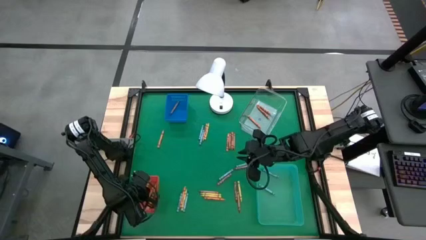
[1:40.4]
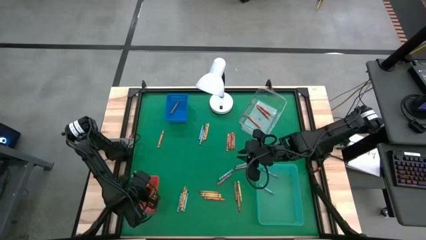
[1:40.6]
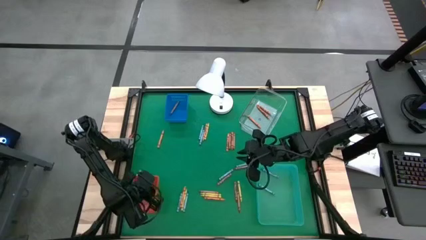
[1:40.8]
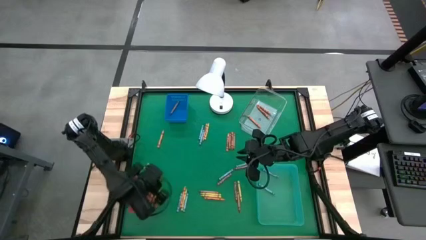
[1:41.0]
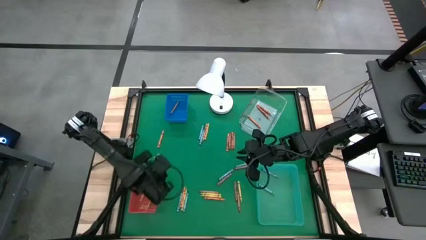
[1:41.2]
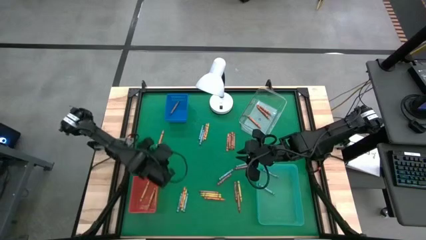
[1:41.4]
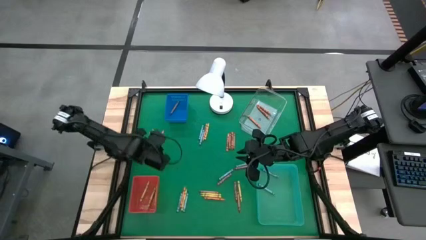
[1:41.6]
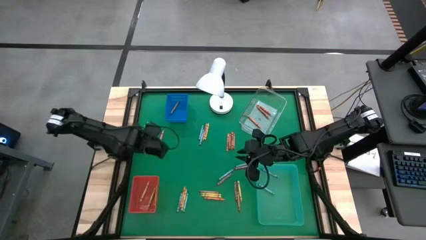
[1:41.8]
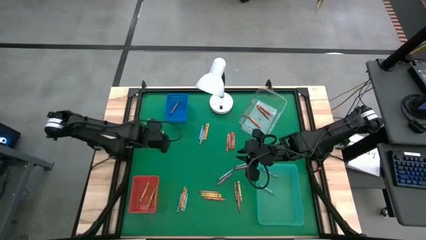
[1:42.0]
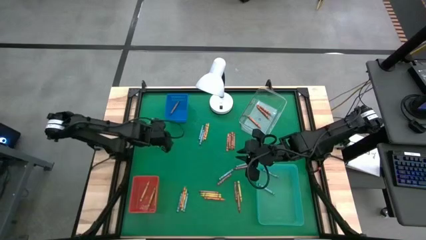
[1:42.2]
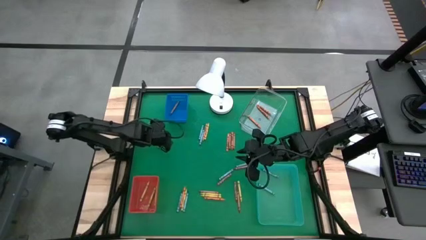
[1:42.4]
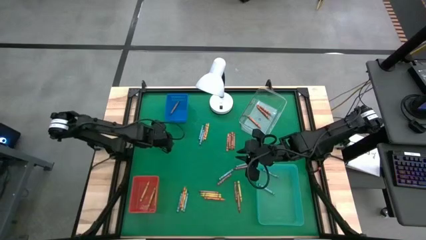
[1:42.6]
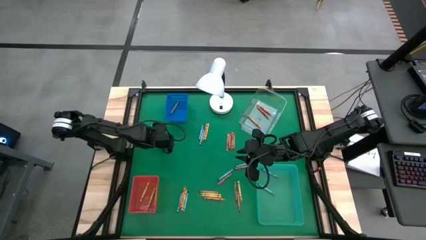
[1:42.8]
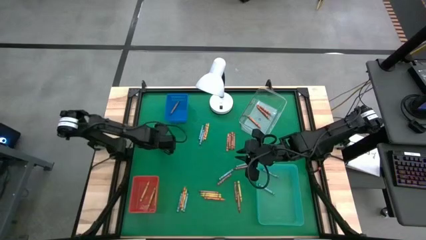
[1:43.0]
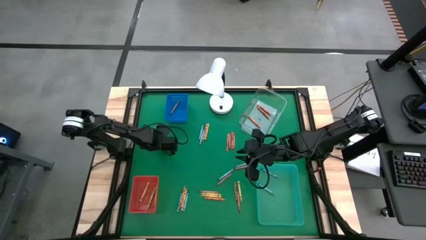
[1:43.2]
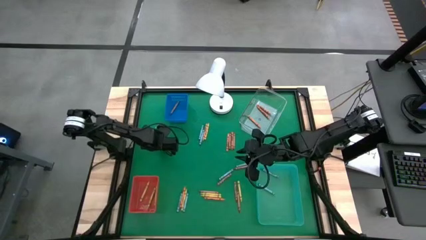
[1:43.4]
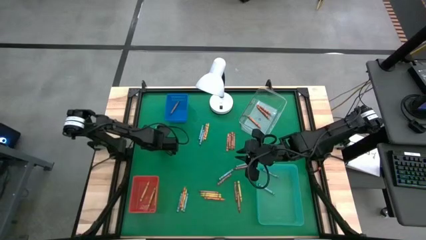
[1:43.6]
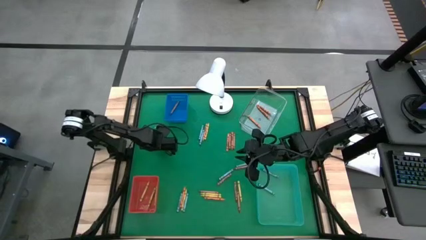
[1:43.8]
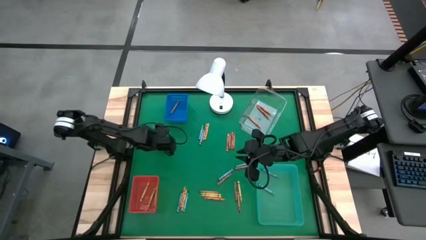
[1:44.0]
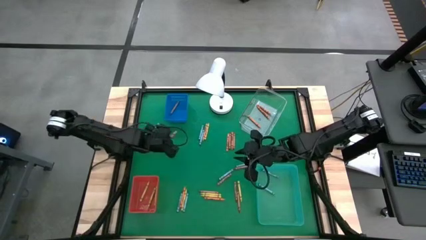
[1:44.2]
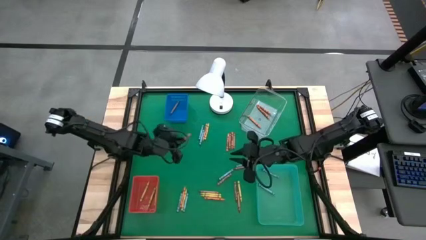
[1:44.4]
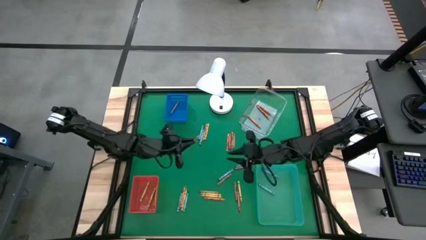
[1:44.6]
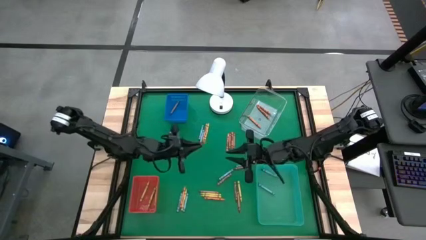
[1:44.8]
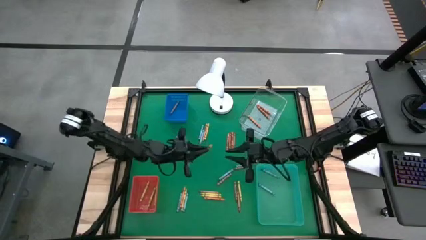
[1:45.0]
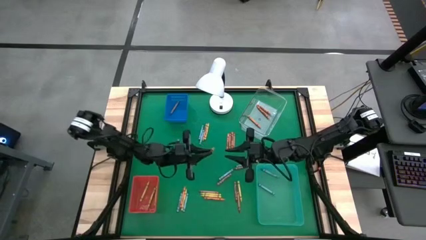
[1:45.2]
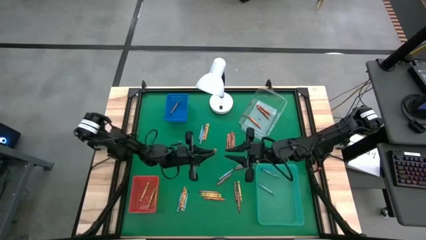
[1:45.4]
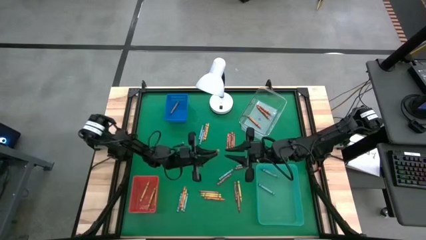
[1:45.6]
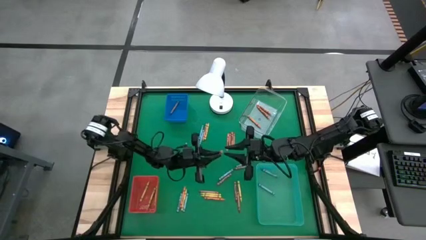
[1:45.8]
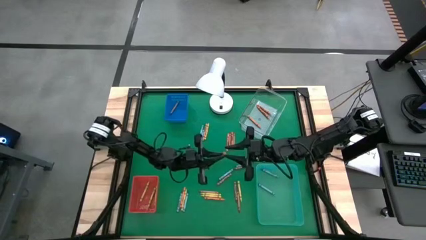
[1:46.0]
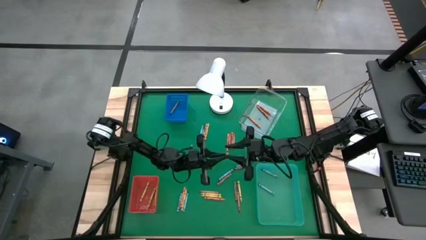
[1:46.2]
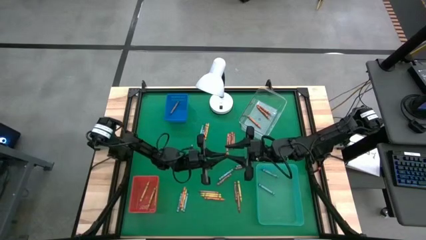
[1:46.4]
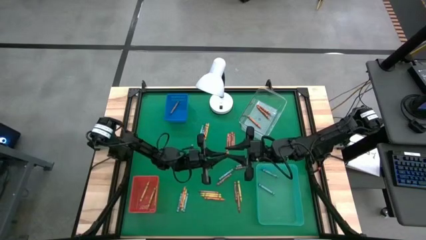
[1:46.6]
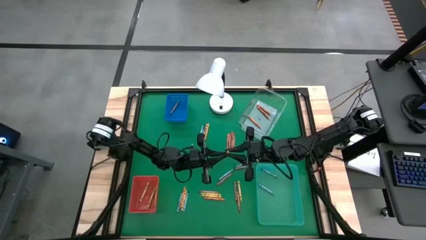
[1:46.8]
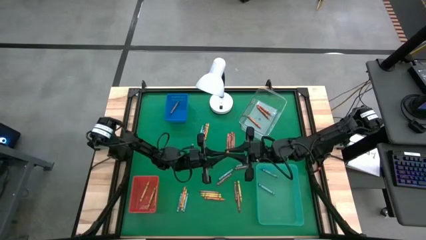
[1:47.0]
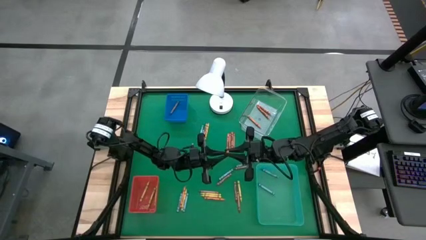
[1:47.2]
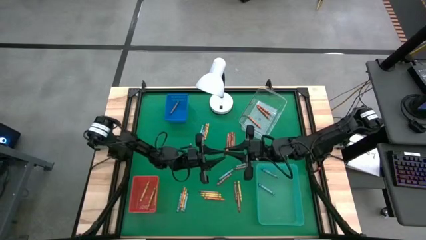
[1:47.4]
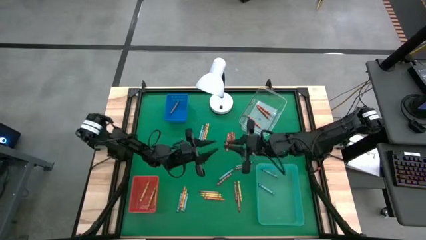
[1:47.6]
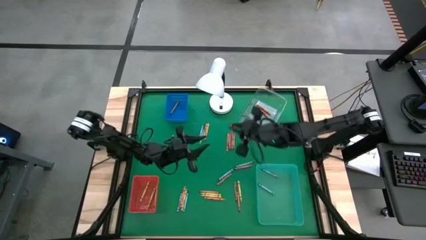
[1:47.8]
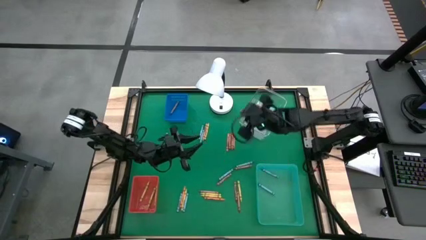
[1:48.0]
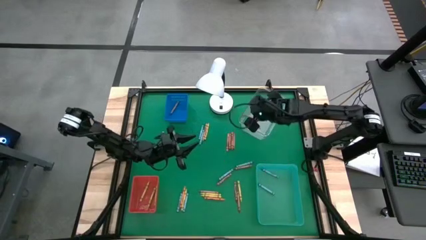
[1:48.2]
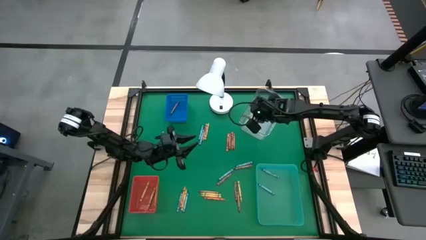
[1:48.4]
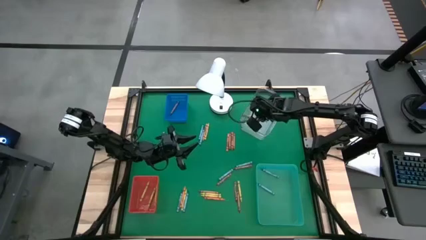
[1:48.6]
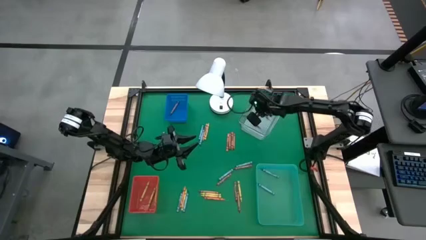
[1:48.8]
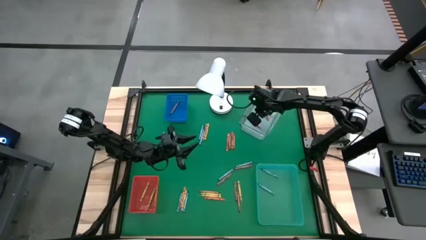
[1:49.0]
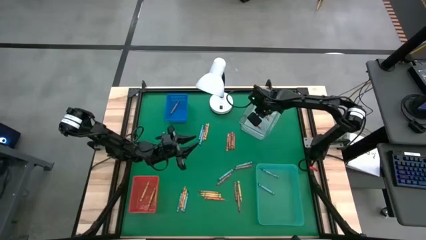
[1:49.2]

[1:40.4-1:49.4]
Task: Sort crayons
Put the orange crayon into the transparent bin
